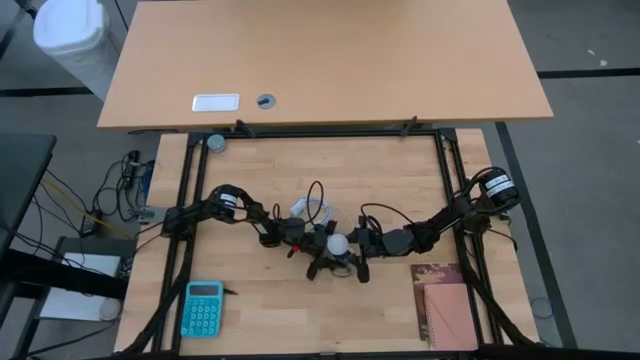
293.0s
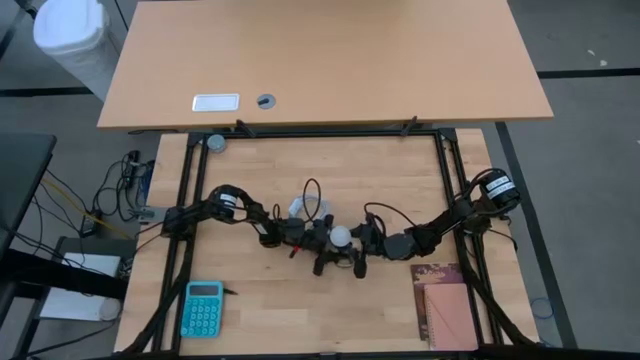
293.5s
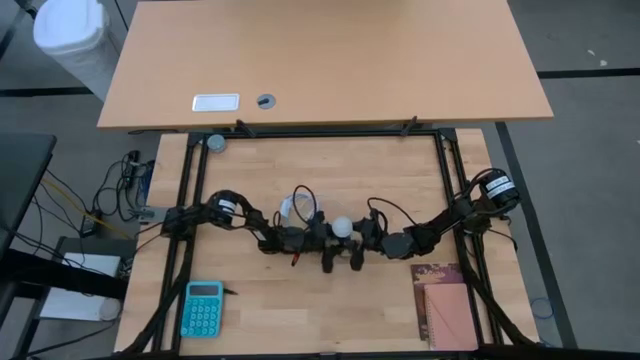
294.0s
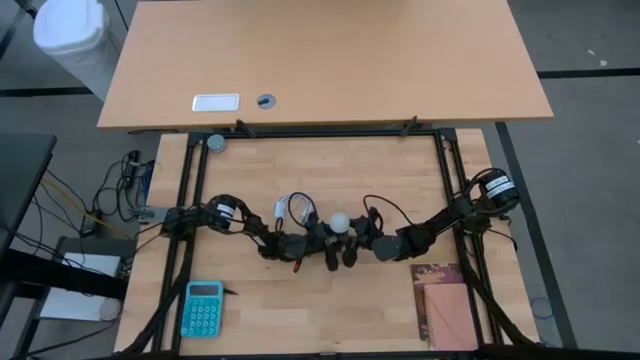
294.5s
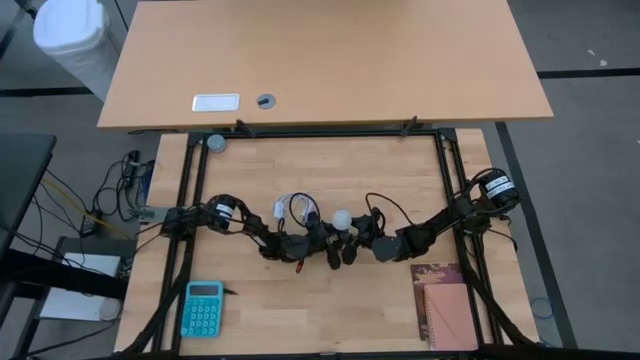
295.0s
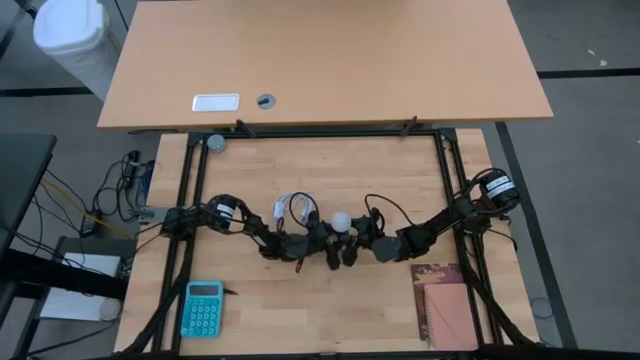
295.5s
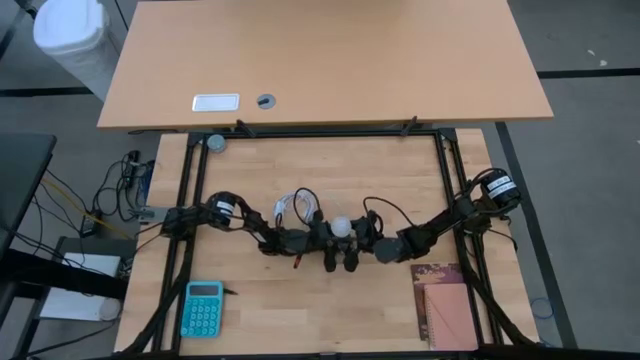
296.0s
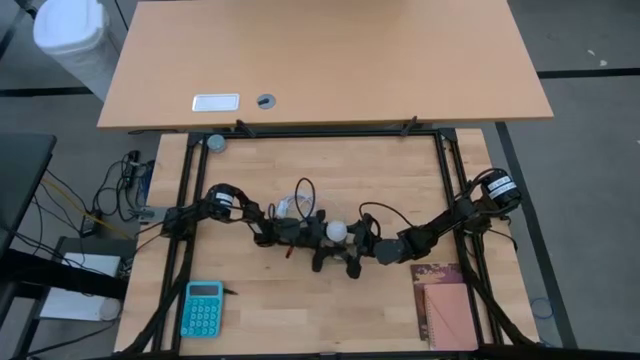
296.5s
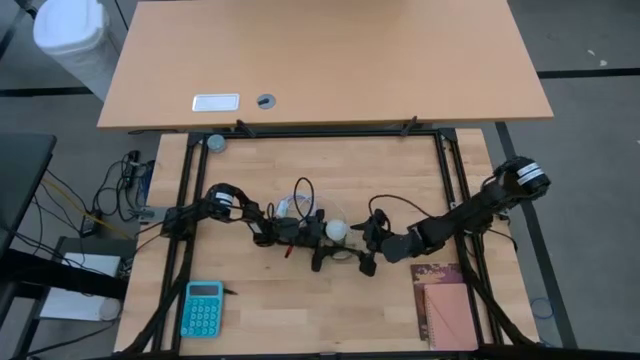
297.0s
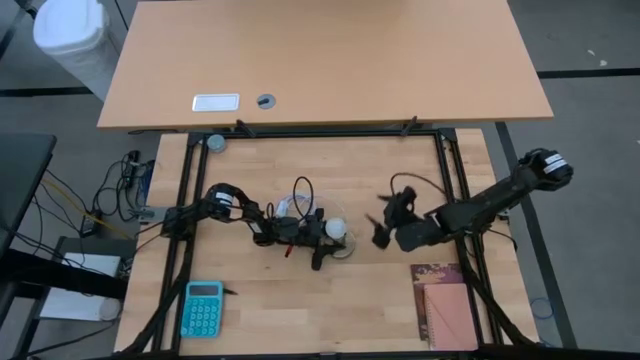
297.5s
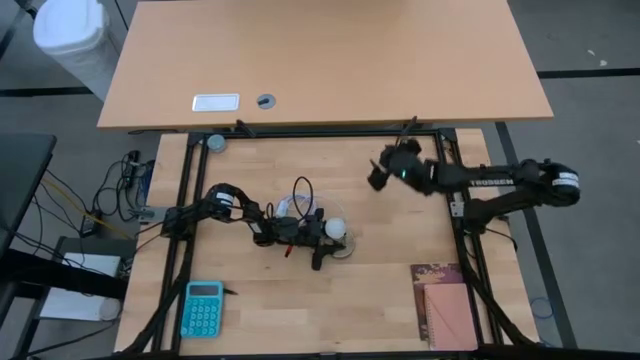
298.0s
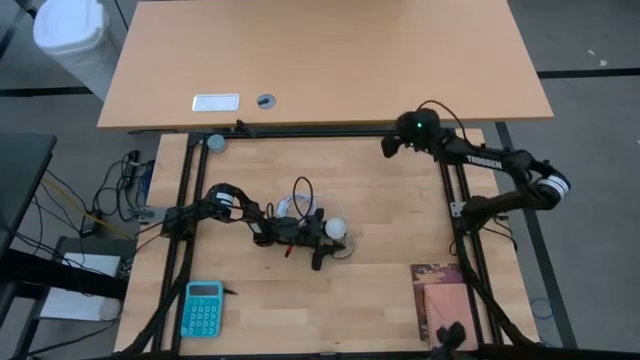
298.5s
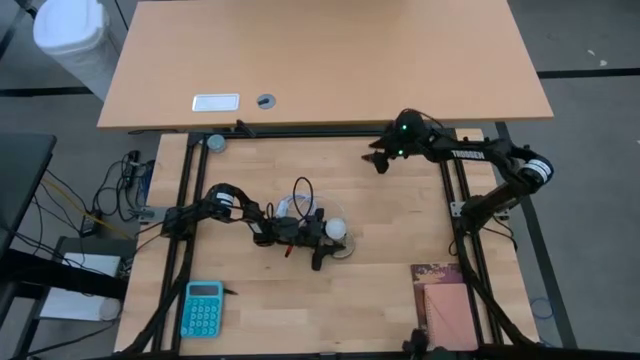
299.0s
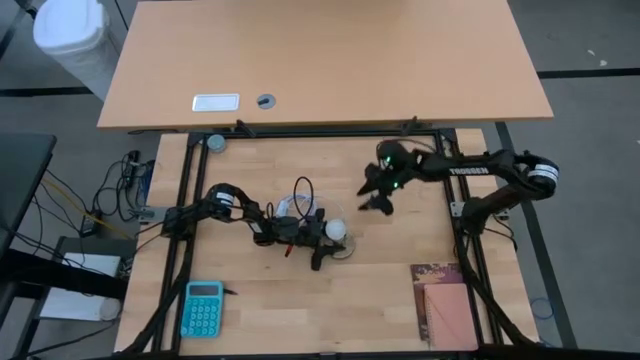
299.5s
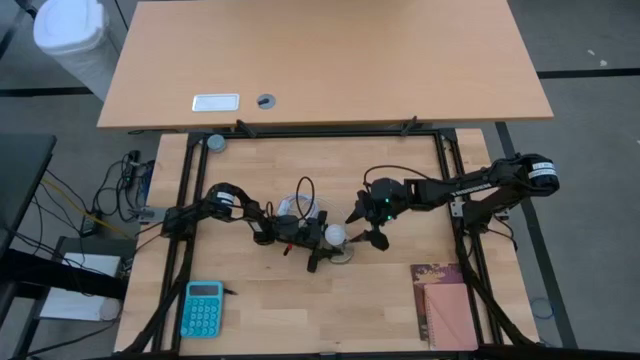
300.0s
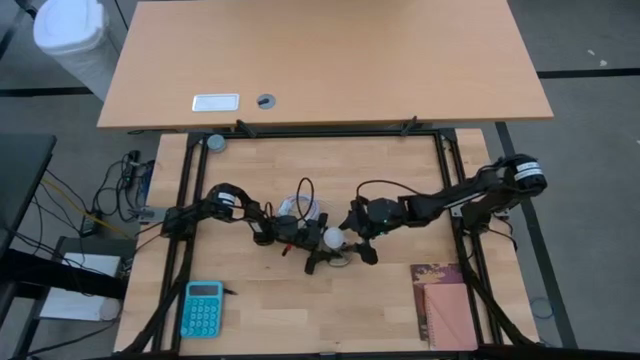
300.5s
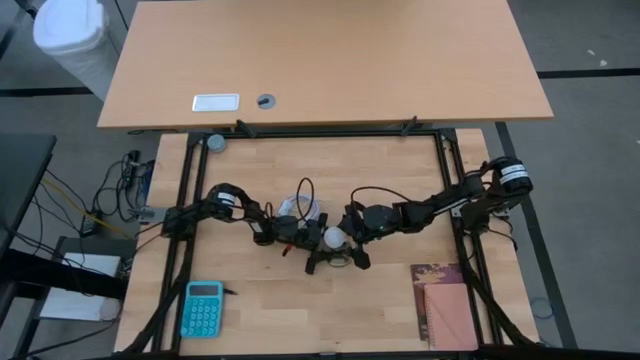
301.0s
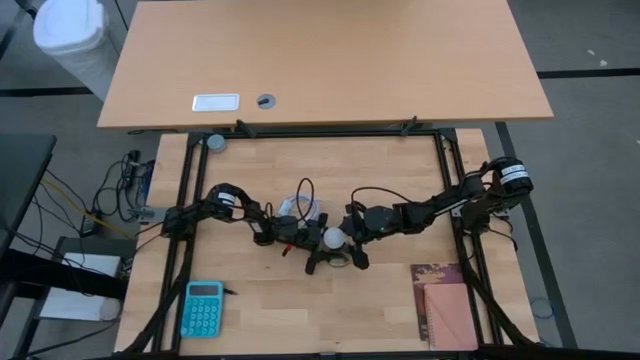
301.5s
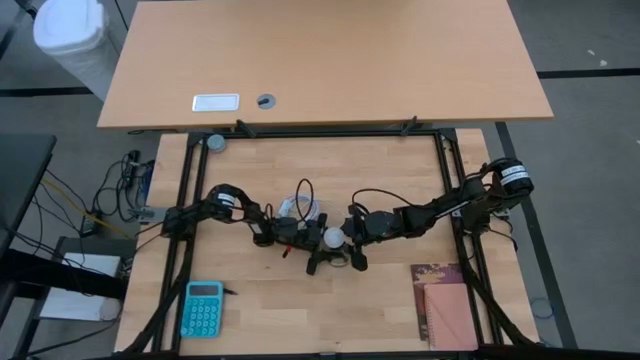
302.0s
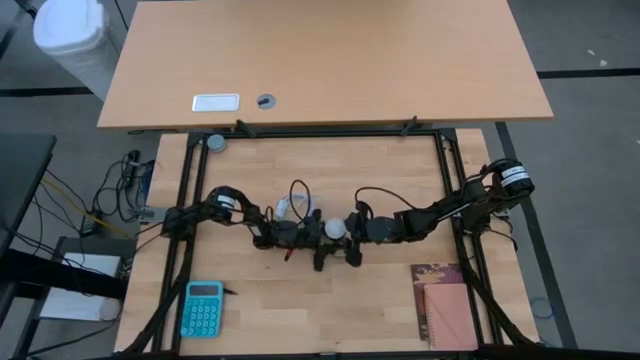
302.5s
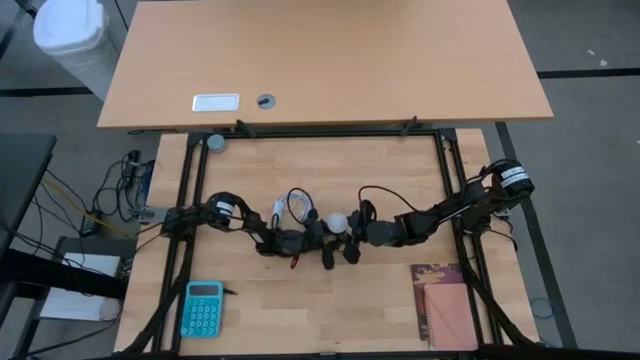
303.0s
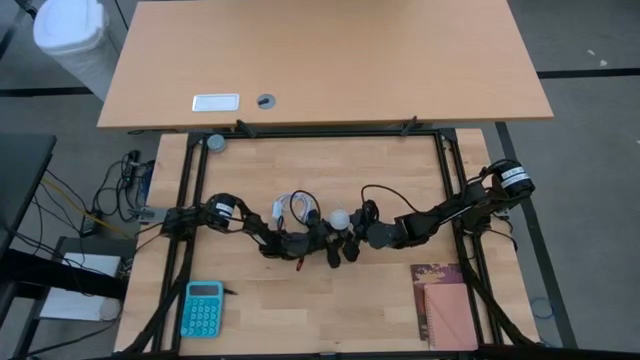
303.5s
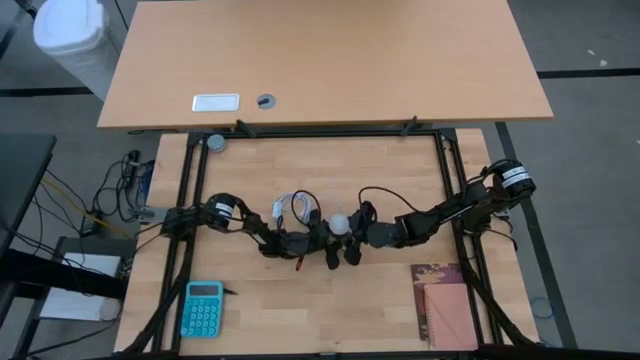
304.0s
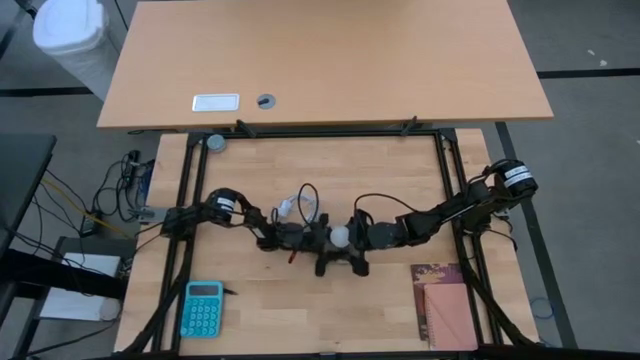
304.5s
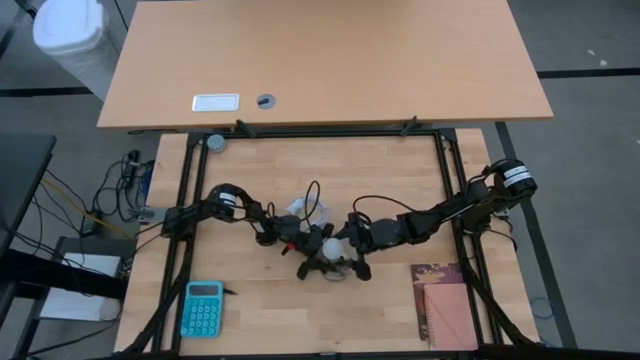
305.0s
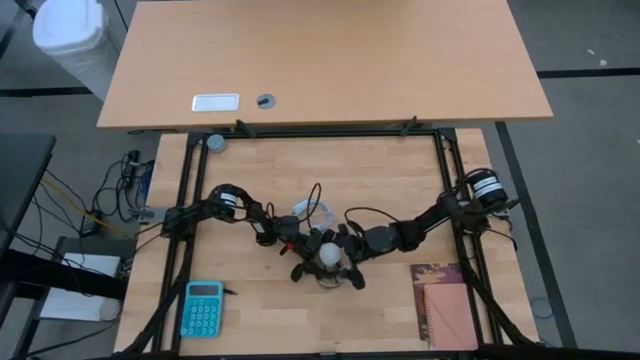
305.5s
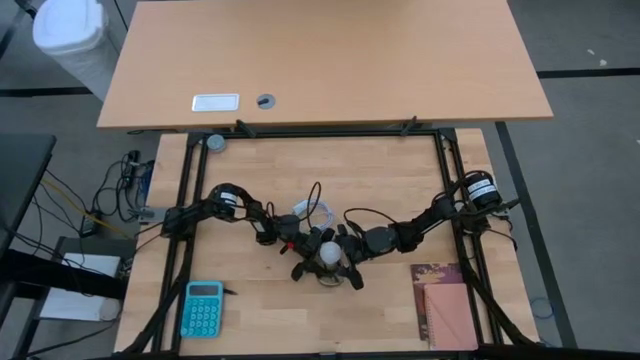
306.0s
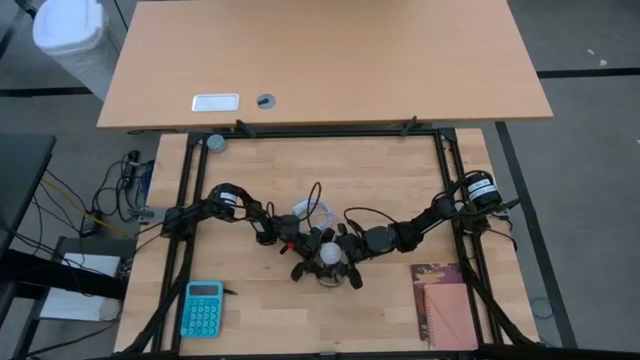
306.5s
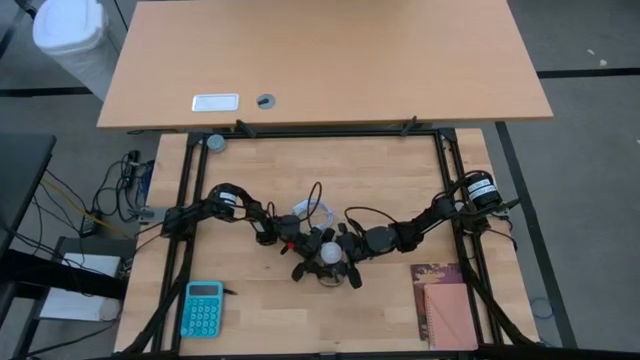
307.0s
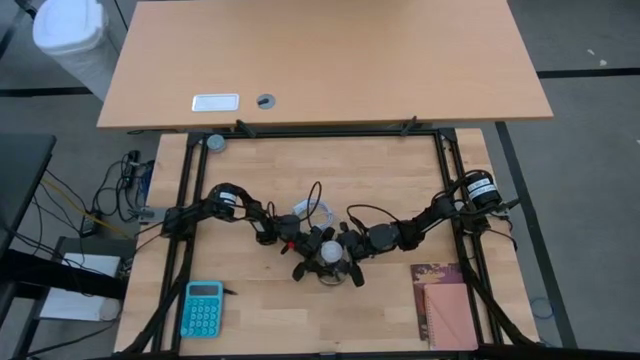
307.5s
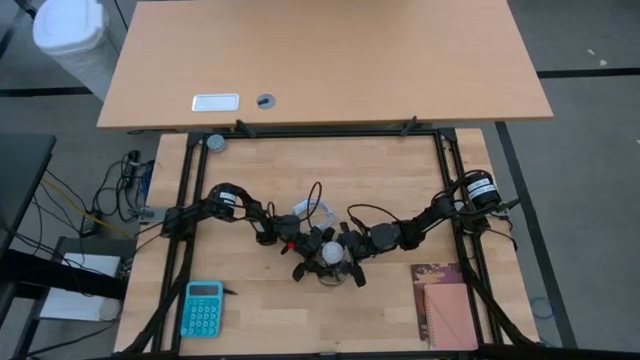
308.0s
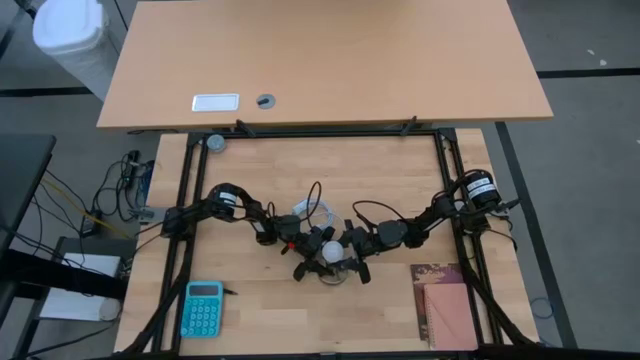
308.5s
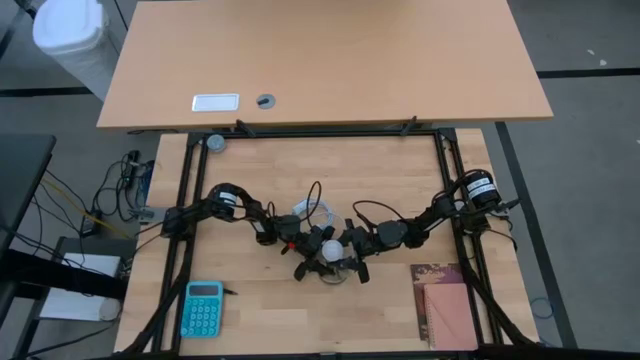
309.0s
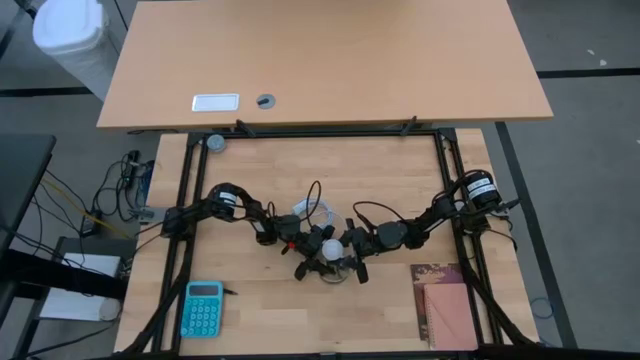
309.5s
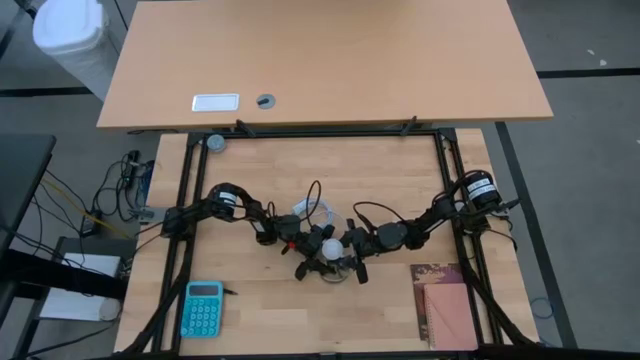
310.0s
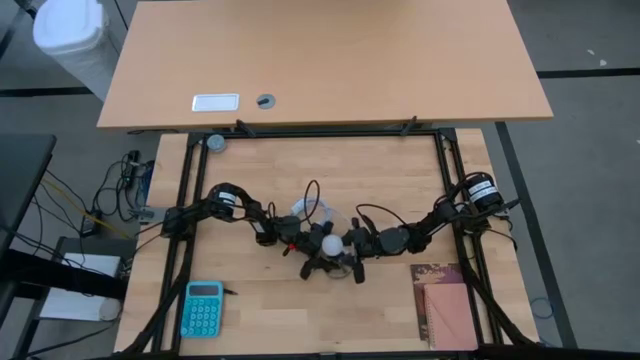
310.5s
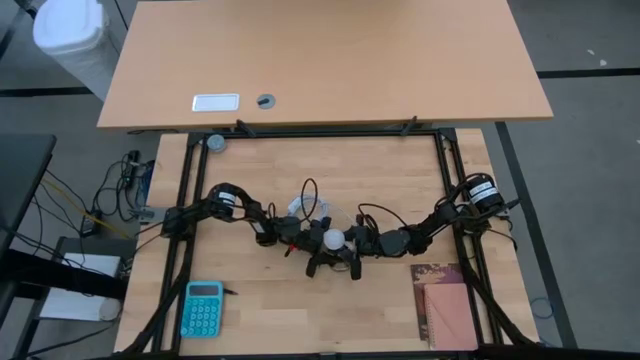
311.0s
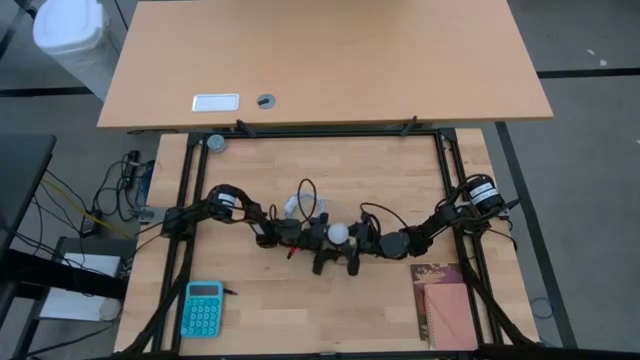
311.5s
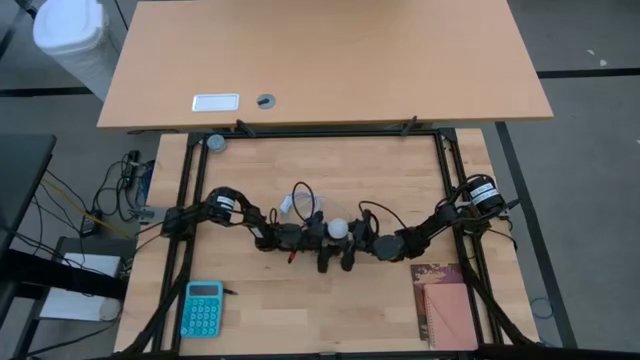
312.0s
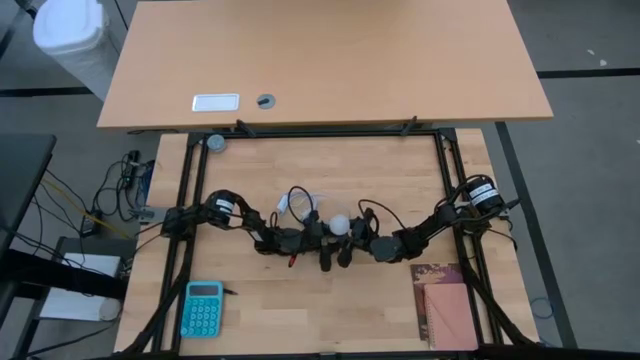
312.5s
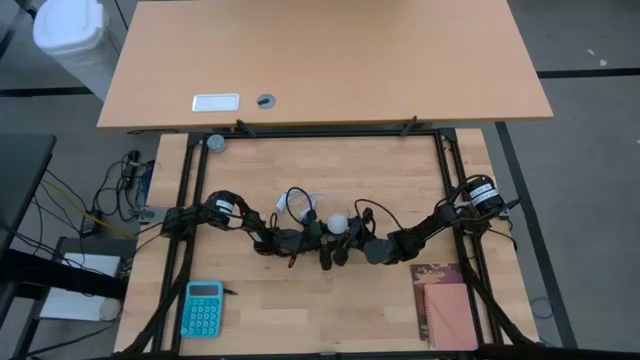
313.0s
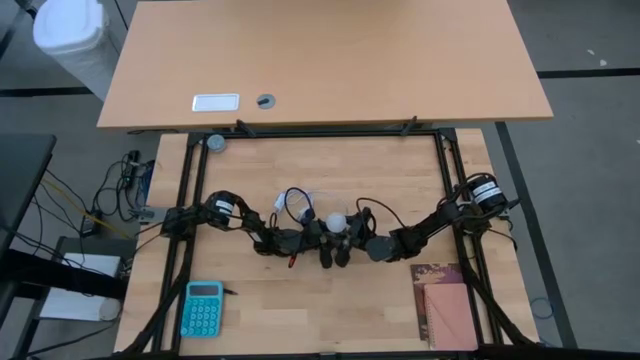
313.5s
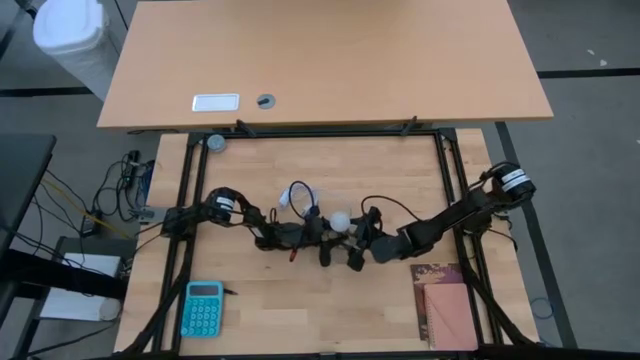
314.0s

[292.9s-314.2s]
Task: Screw lightbulb
Insert the white lightbulb into the lamp socket
